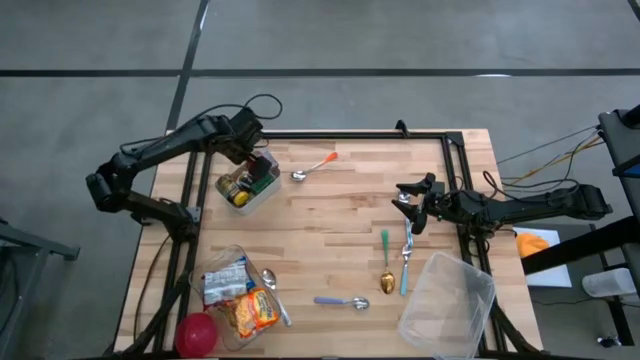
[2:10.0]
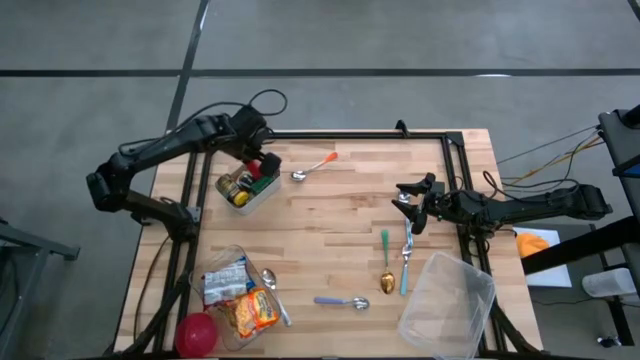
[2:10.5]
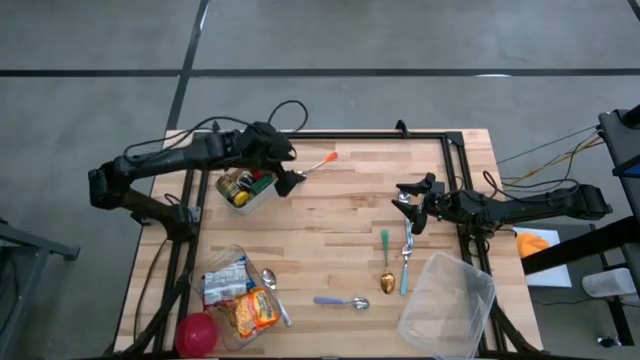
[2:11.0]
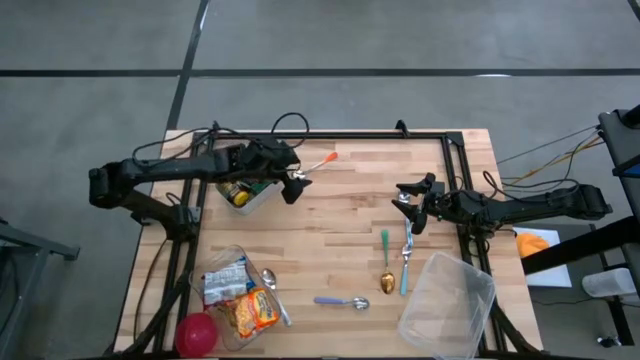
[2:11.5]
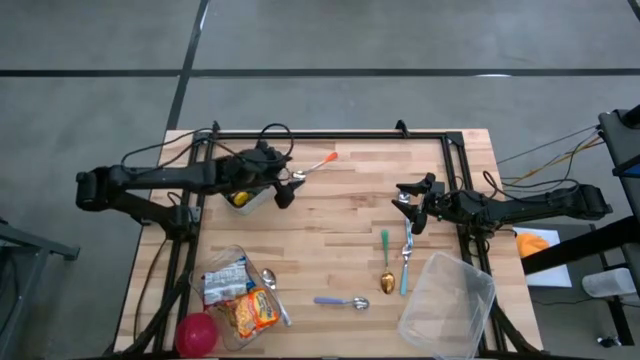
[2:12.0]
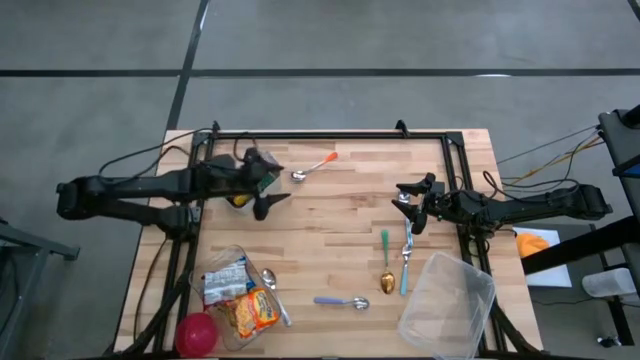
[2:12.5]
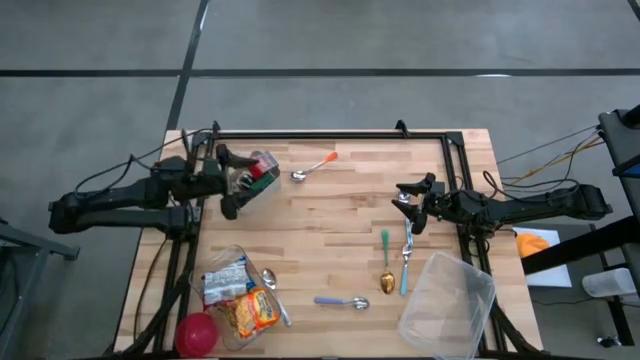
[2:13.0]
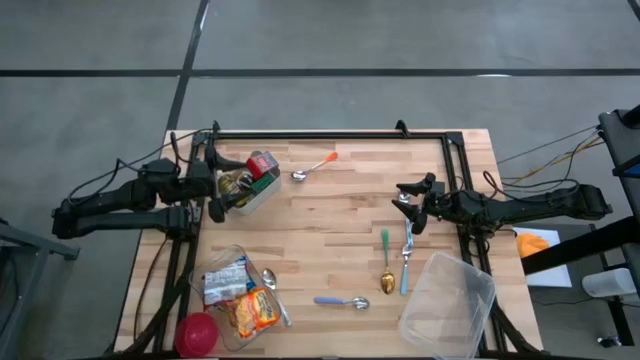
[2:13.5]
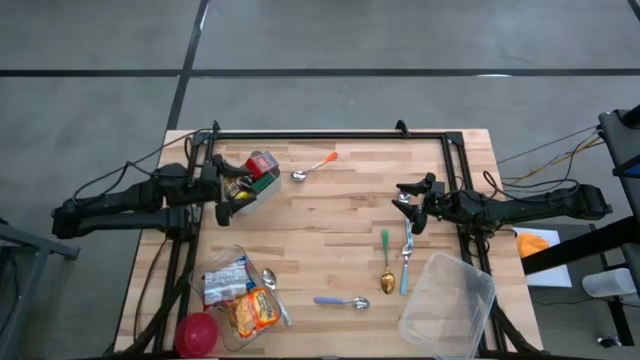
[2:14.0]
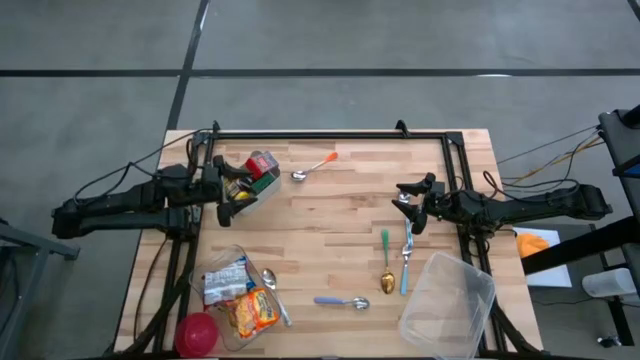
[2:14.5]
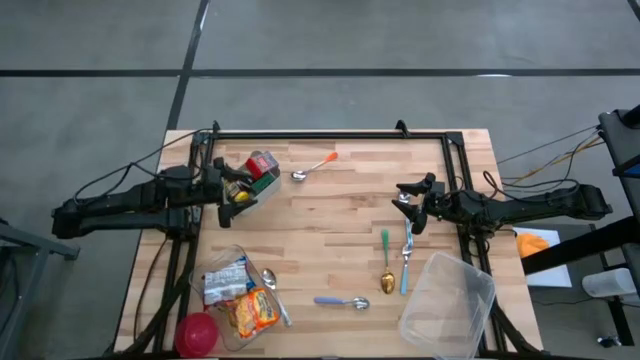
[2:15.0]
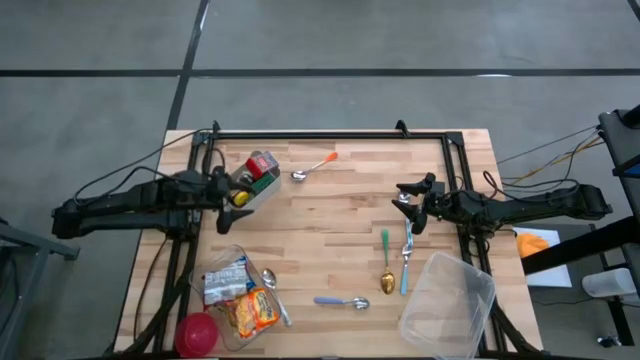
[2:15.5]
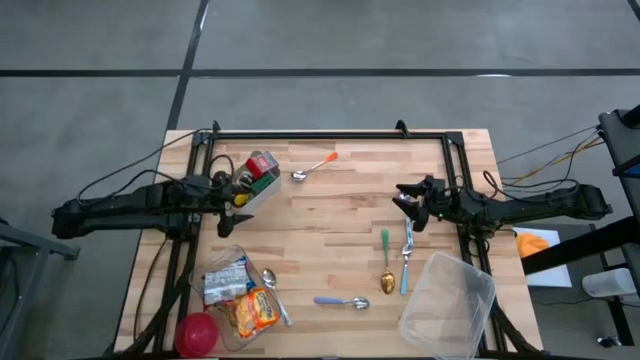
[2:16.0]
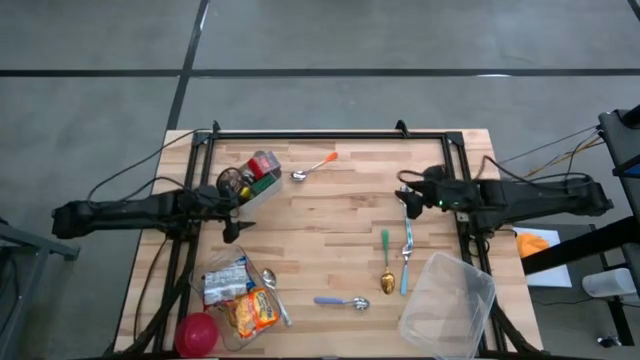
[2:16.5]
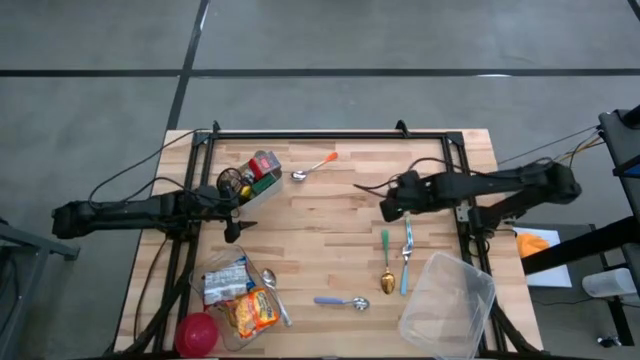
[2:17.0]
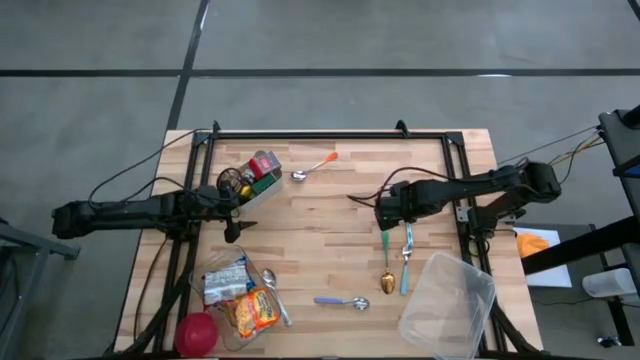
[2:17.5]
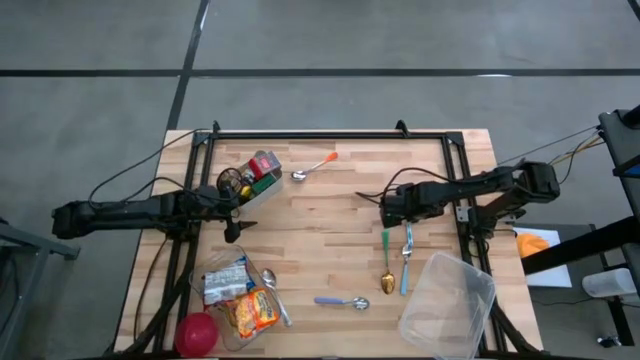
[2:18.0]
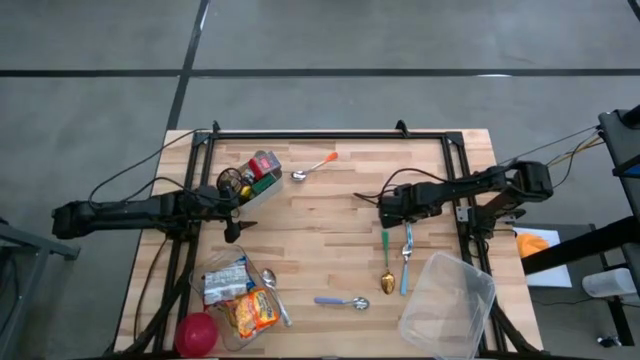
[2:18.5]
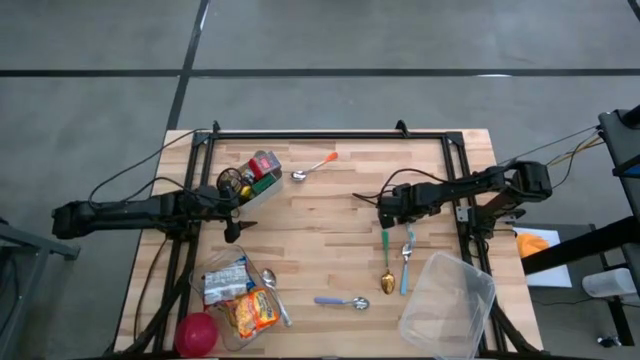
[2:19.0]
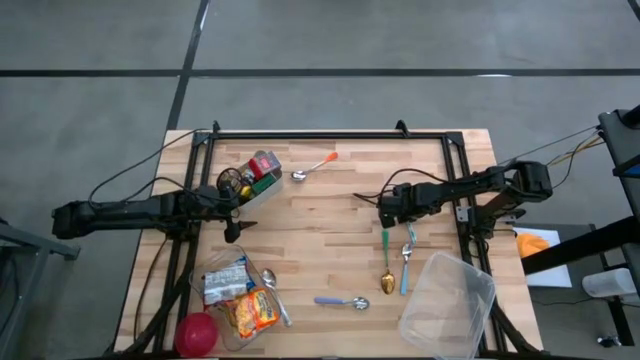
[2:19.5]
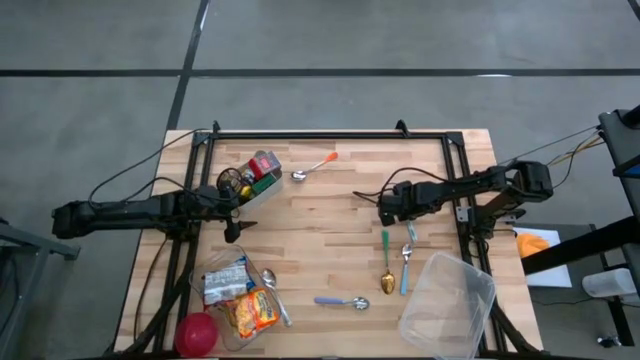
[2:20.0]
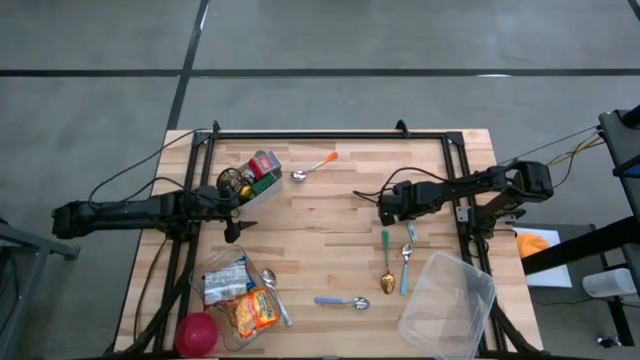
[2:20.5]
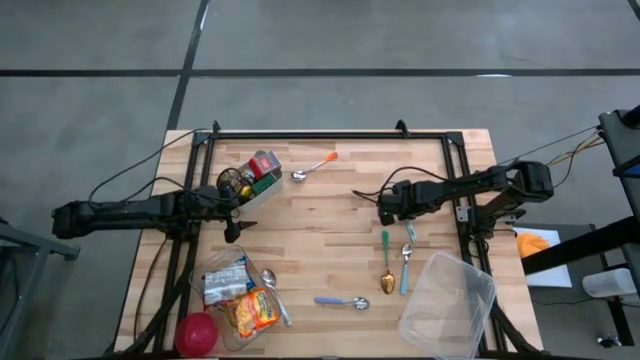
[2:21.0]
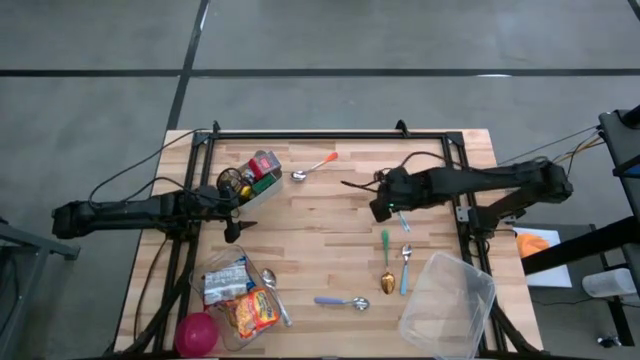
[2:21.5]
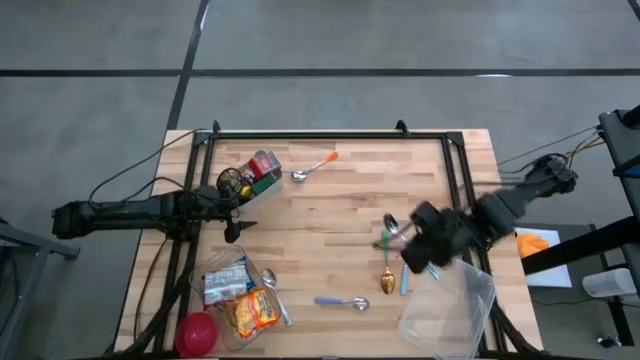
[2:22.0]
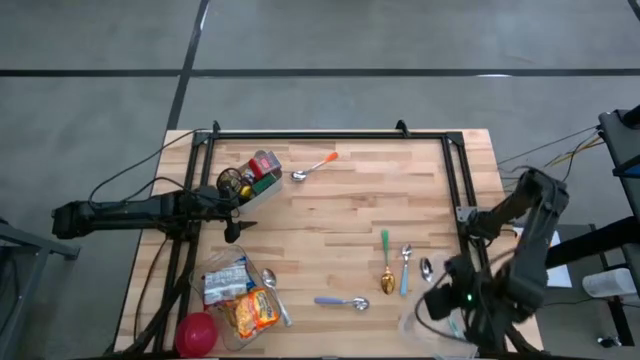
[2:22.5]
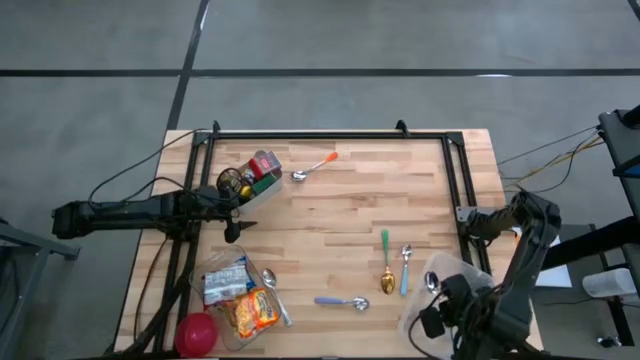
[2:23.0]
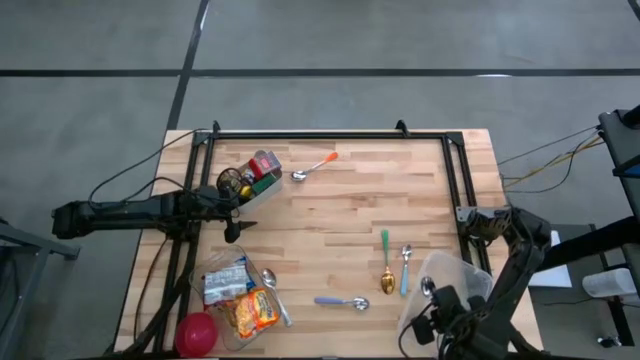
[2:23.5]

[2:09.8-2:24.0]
Put the white spoon into the white bin

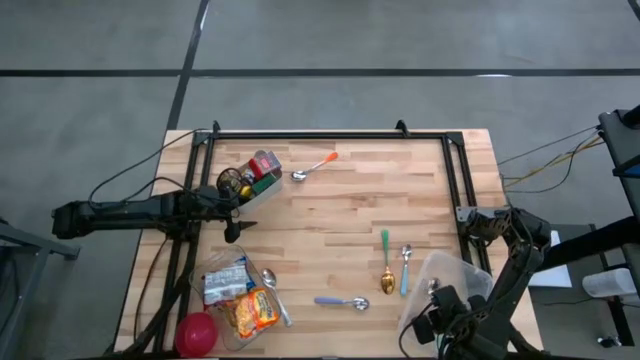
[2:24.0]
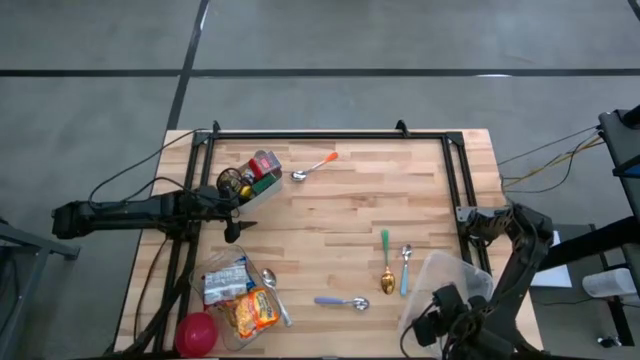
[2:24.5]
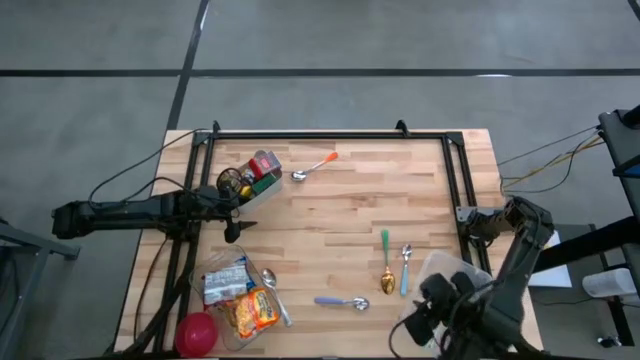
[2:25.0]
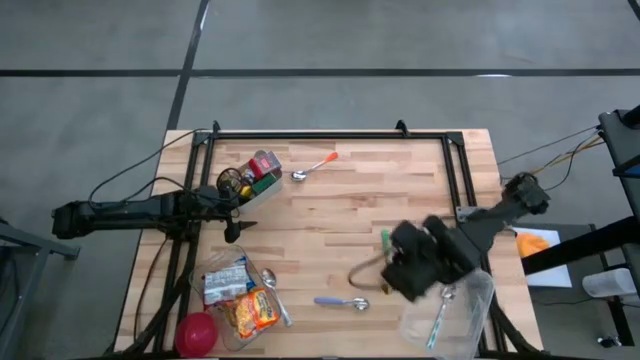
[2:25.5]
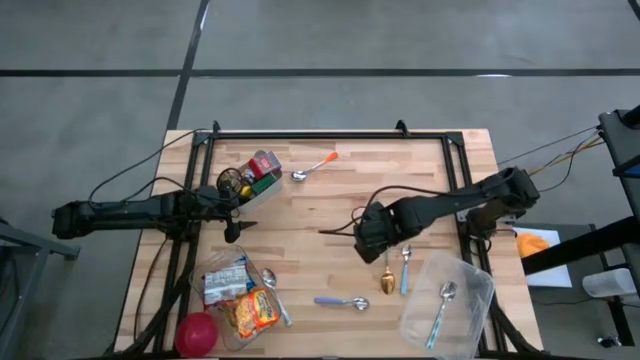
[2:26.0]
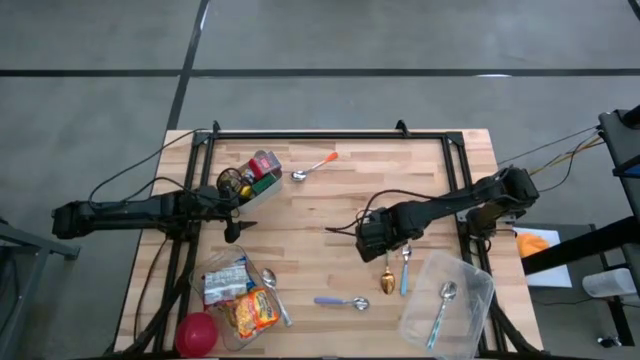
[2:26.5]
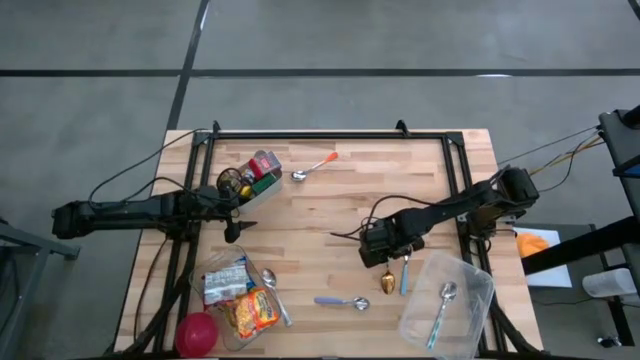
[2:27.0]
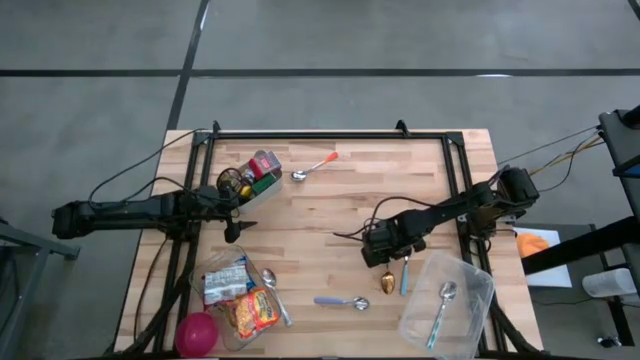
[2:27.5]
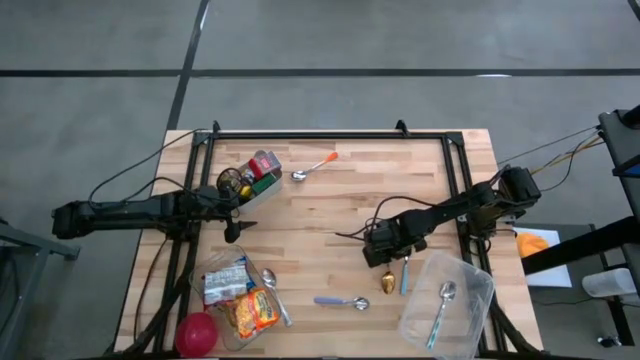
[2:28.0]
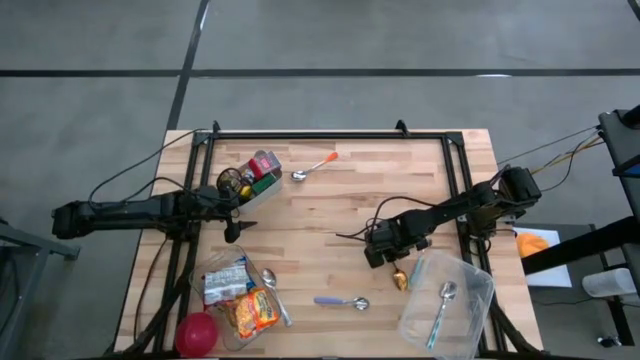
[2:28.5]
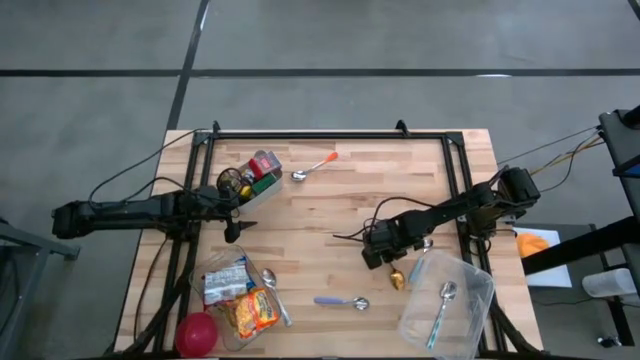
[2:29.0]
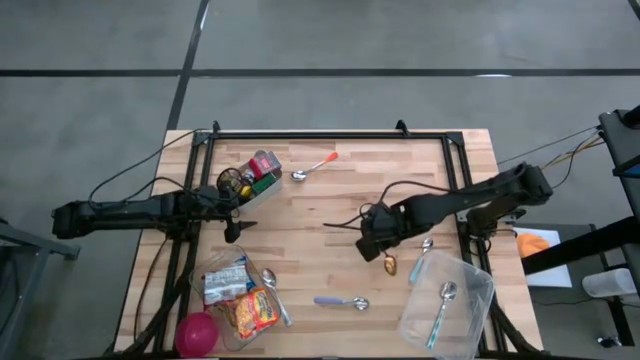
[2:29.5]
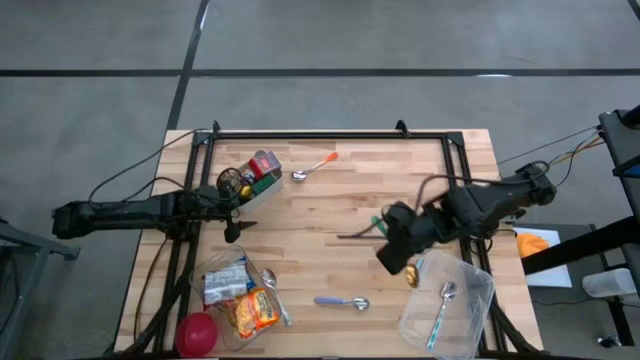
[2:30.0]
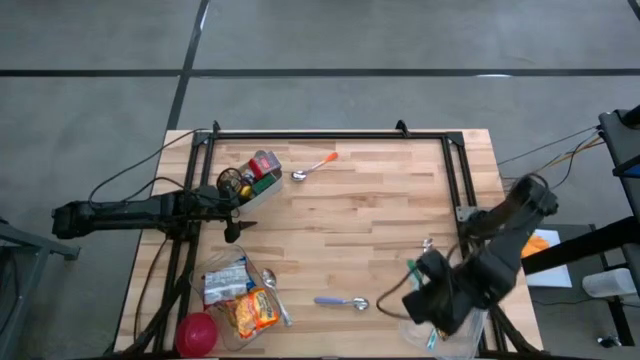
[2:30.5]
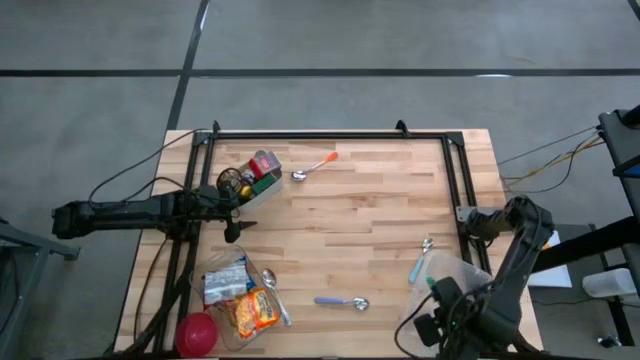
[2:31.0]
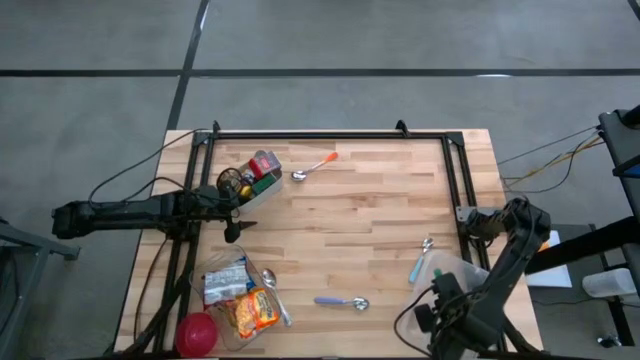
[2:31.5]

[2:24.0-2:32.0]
Put the green spoon into the white bin
